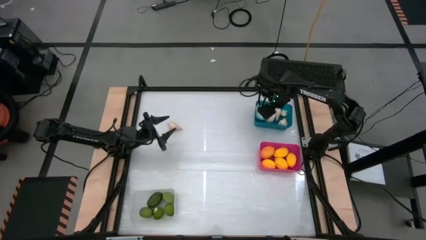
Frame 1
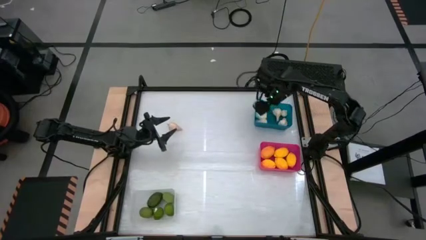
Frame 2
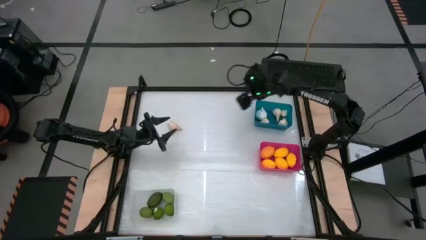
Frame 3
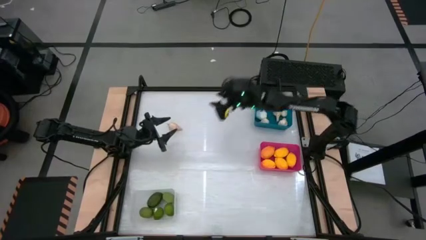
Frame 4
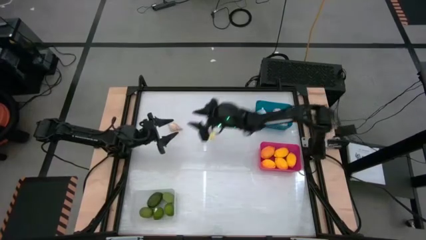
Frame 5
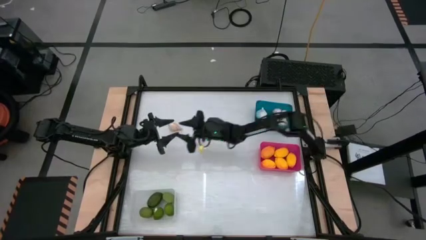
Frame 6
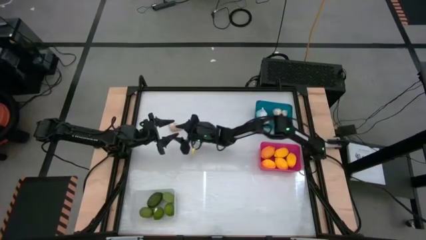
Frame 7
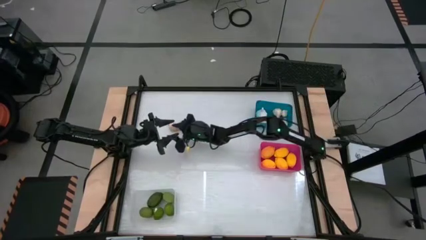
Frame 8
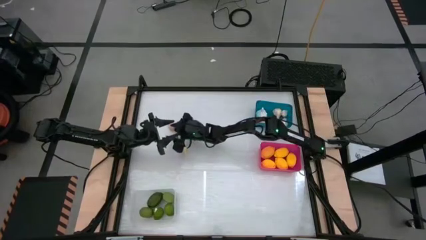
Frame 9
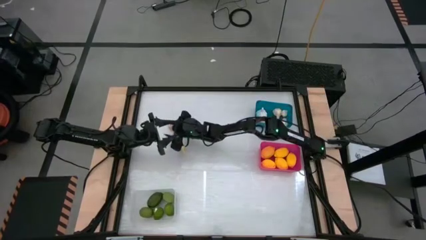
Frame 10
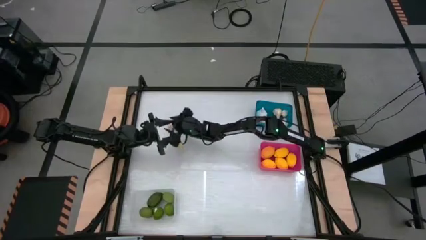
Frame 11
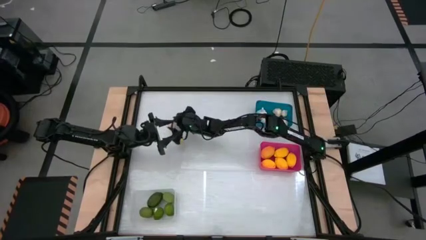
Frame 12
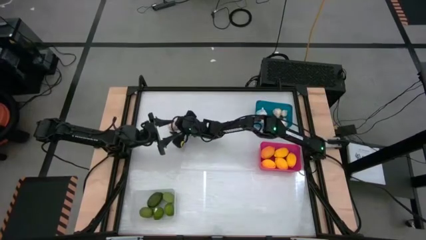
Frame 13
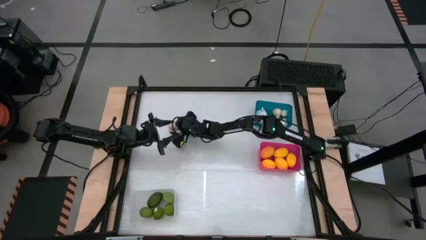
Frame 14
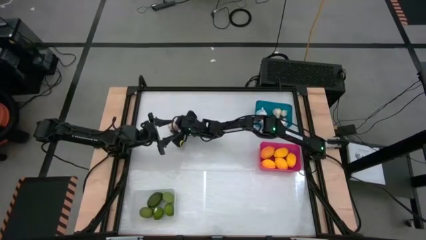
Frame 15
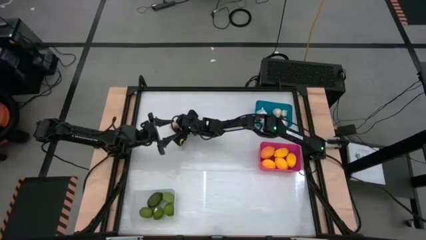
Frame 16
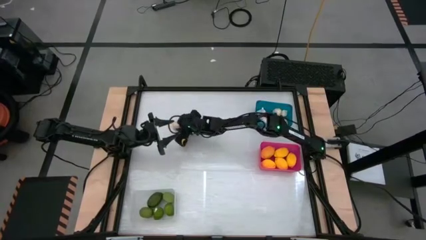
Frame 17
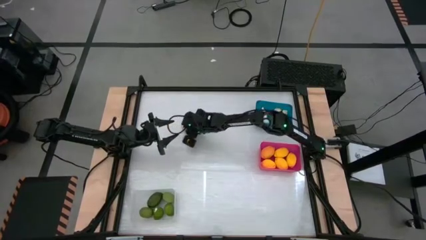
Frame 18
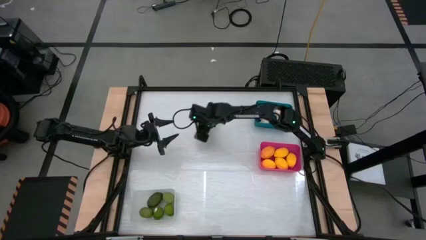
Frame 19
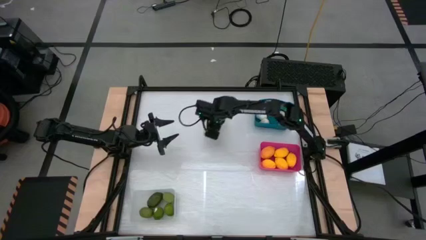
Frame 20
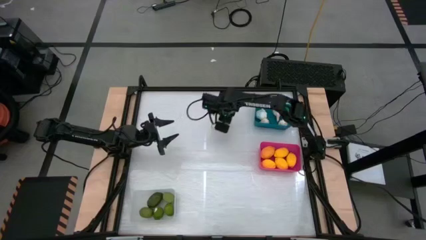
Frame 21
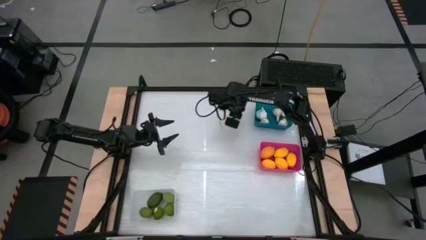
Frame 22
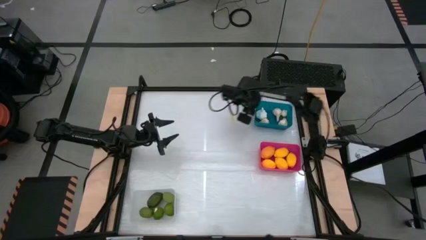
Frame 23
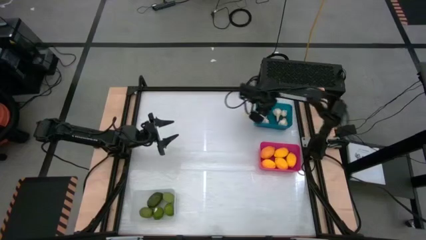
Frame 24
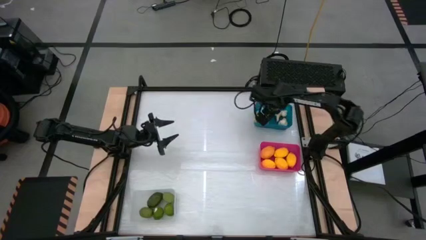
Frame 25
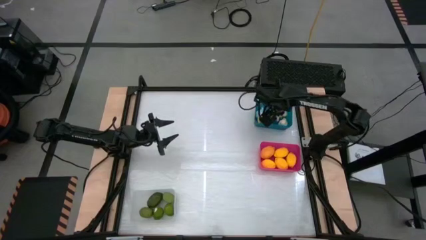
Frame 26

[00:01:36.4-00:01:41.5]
Task: Sort produce into baskets
Put the white garlic into the blue bin

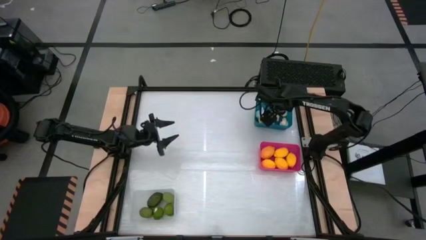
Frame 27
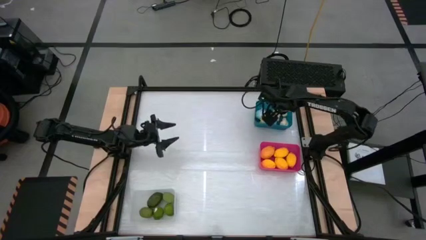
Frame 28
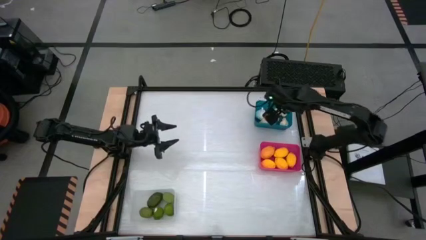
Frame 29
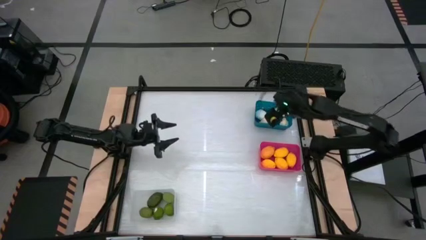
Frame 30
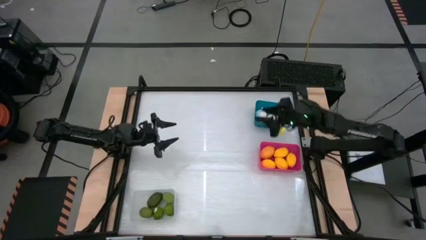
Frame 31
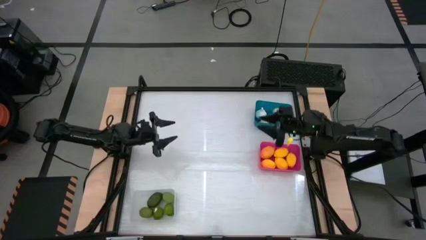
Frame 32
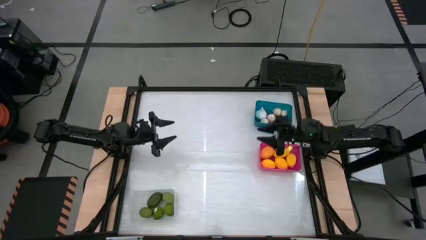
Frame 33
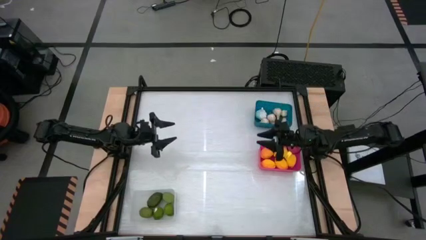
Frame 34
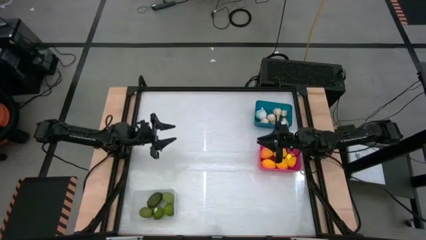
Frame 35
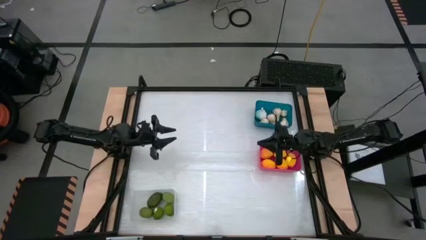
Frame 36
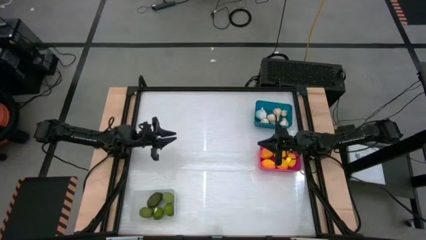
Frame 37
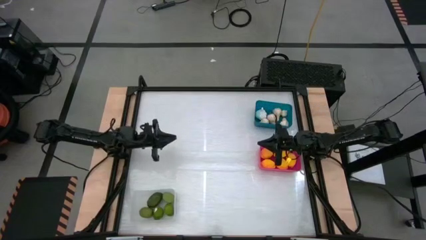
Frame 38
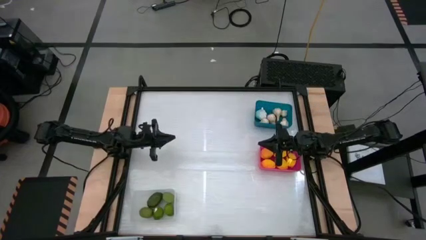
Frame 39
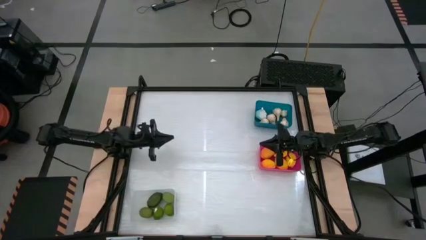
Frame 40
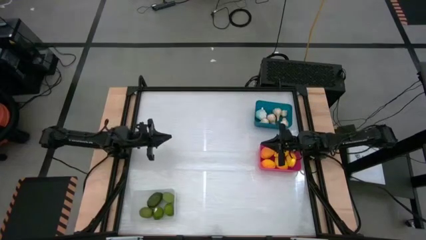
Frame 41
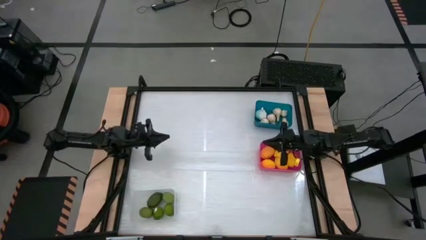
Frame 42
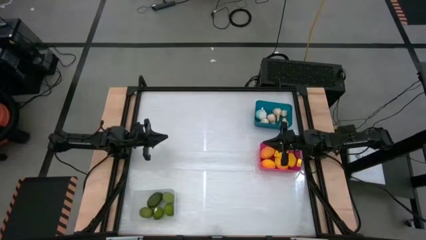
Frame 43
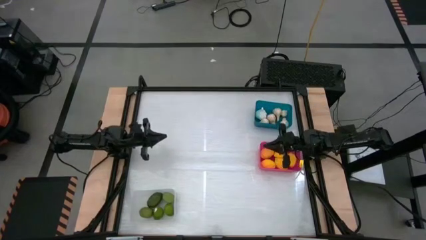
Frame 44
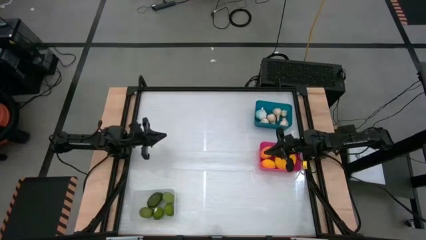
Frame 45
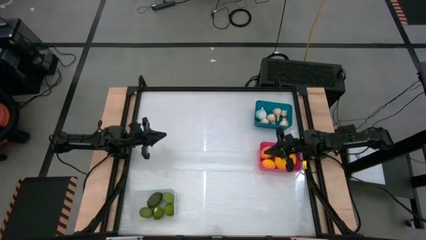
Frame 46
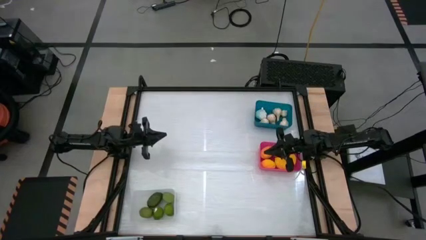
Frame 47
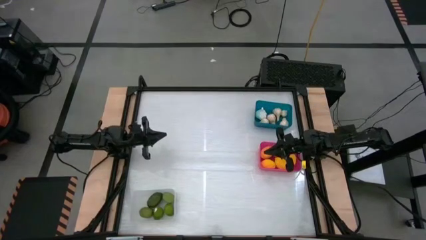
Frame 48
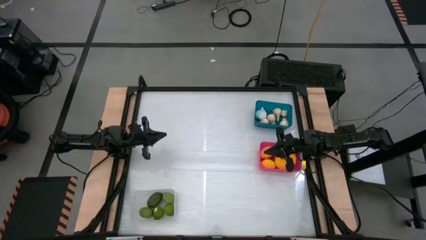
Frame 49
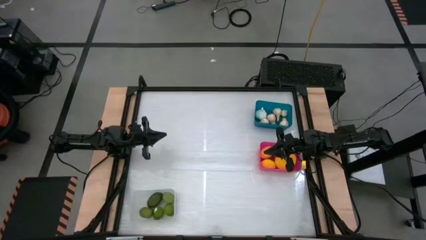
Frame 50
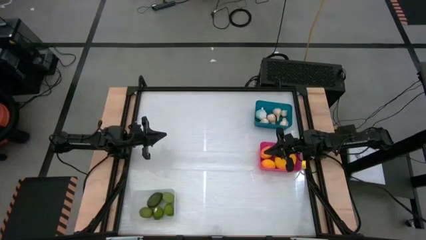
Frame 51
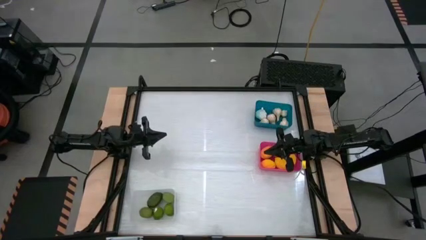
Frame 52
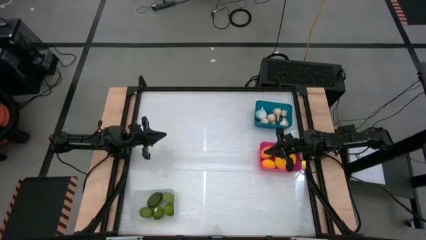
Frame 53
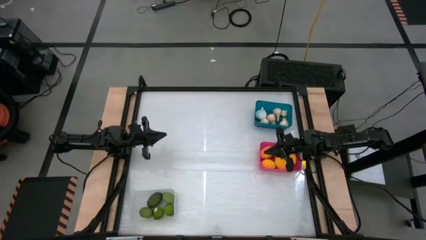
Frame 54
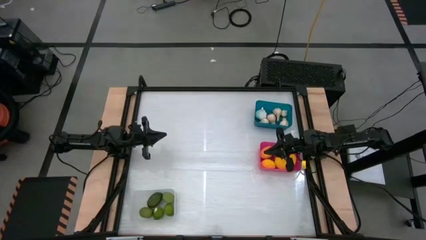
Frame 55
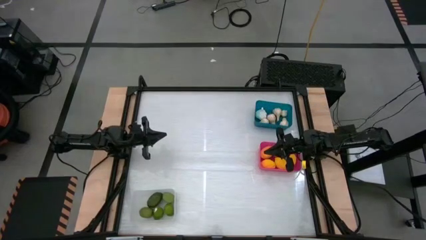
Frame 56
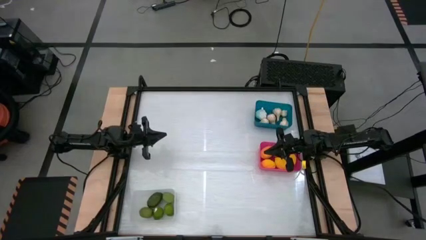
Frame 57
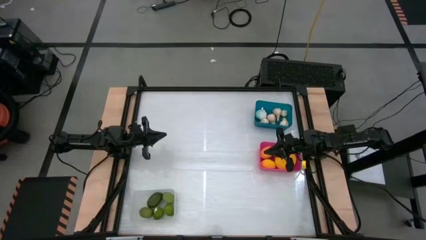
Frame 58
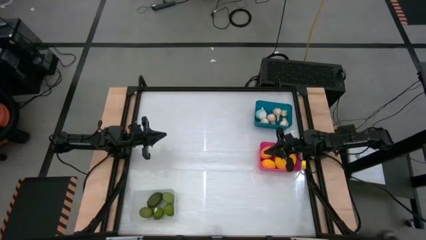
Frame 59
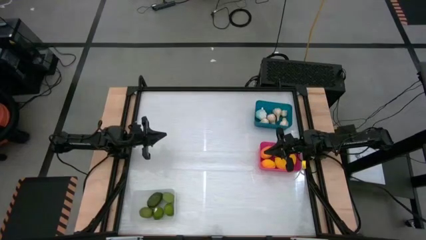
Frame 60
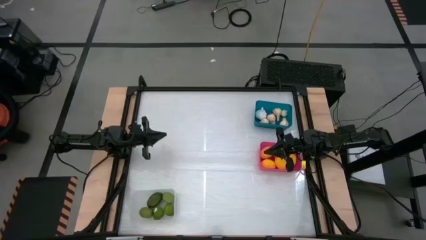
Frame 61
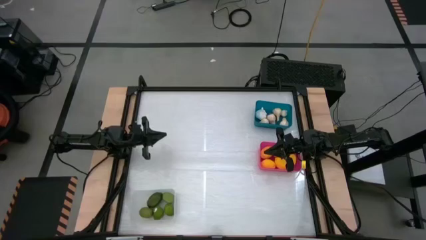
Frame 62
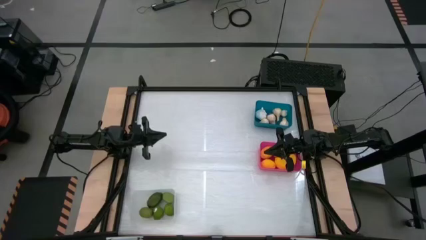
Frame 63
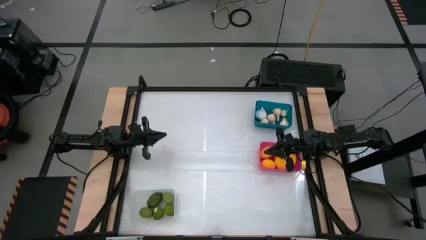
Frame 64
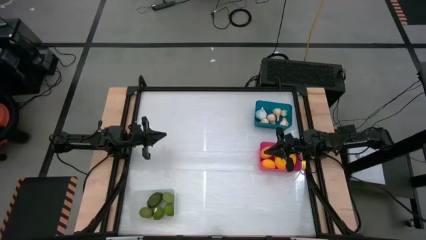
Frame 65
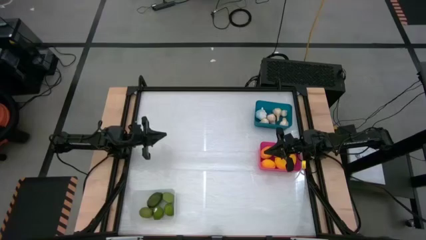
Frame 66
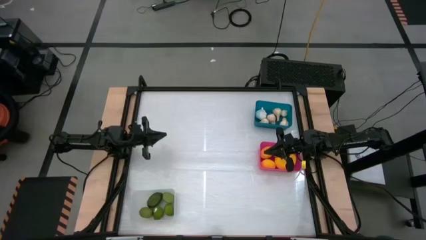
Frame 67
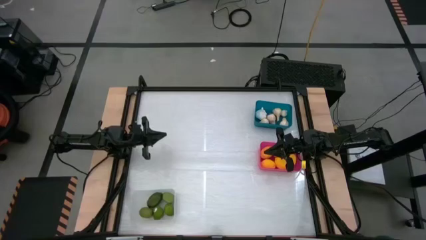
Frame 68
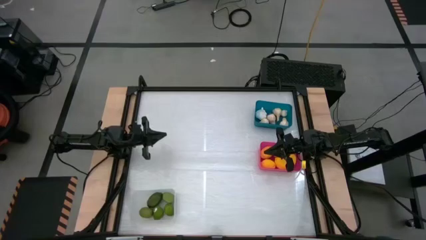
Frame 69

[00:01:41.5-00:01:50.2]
Return to Home Position

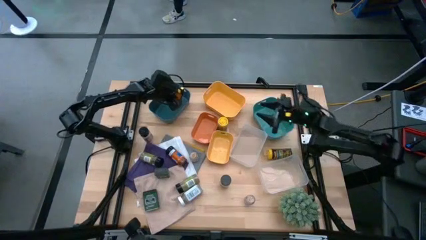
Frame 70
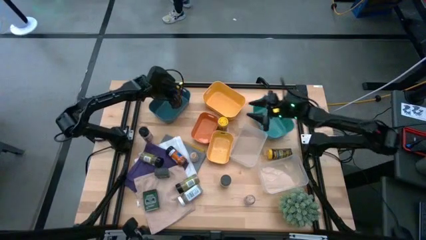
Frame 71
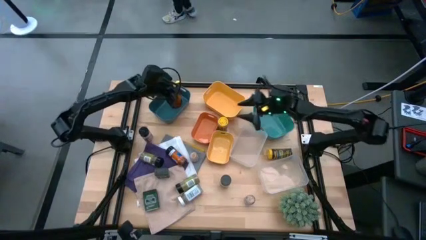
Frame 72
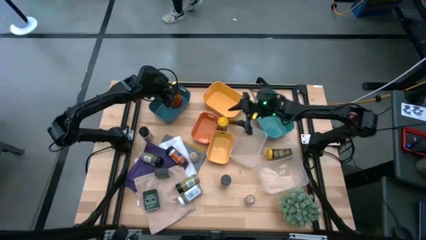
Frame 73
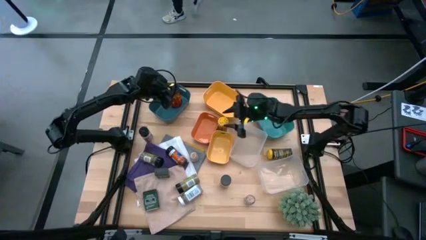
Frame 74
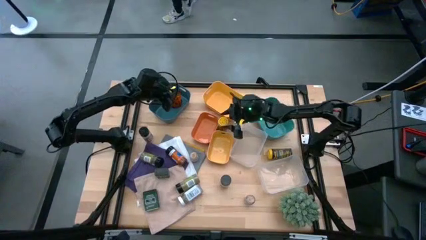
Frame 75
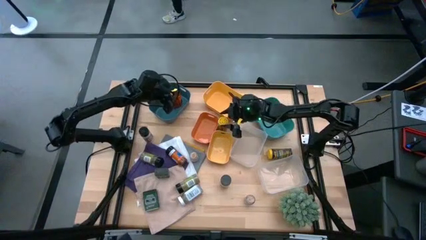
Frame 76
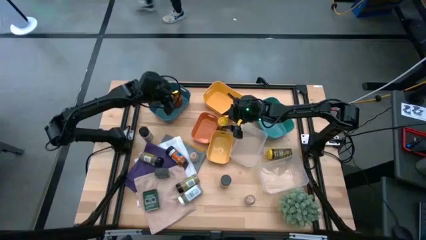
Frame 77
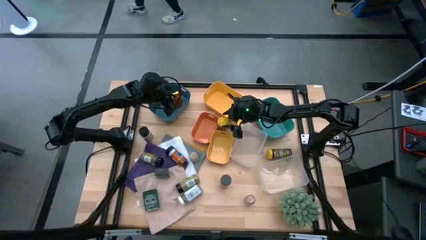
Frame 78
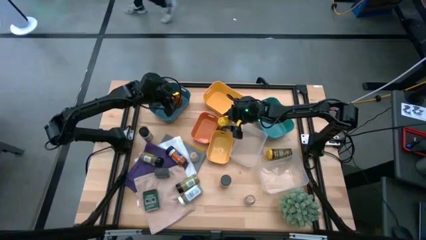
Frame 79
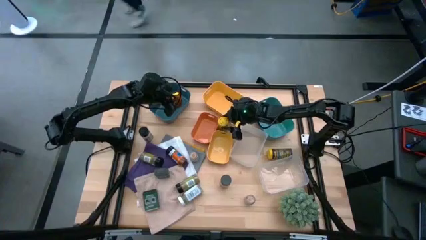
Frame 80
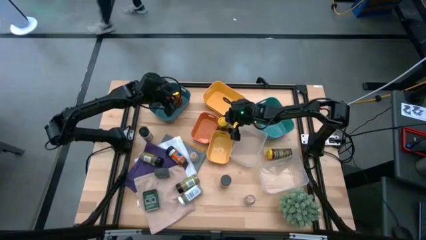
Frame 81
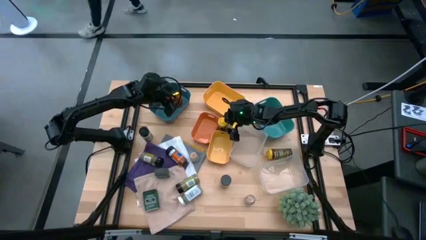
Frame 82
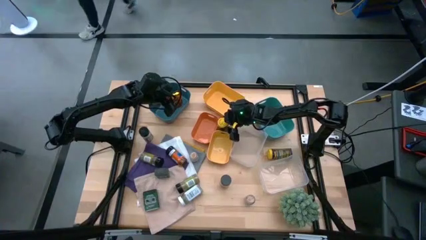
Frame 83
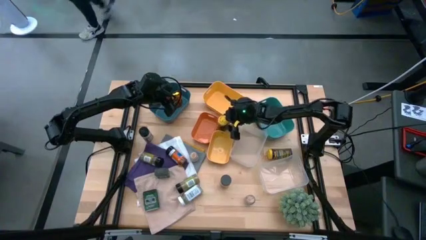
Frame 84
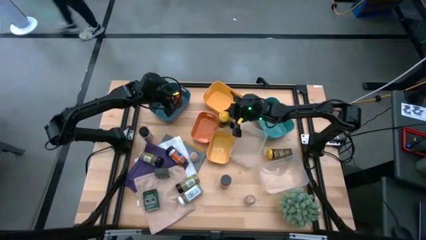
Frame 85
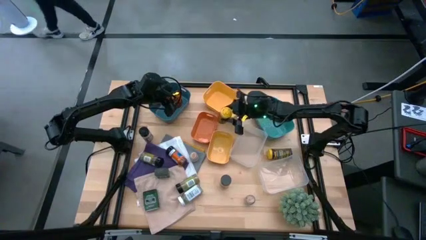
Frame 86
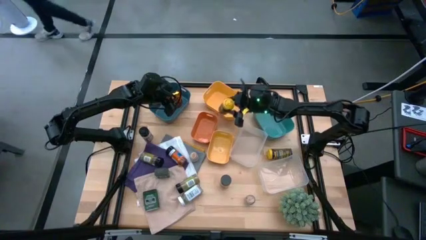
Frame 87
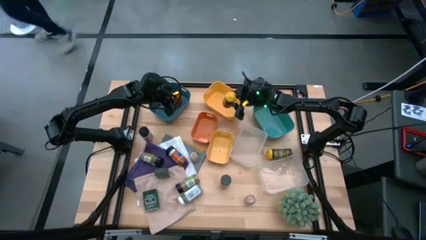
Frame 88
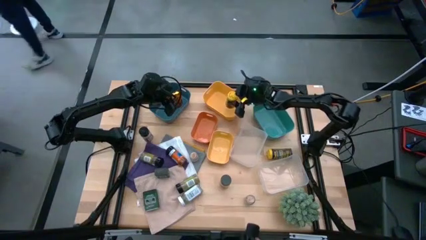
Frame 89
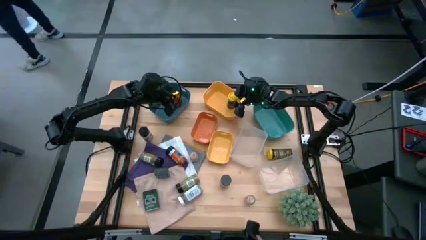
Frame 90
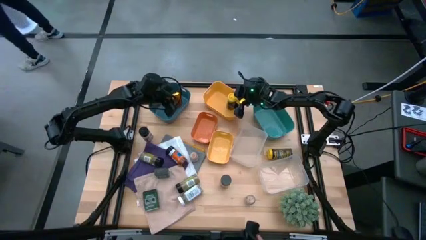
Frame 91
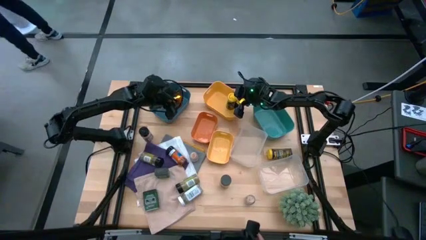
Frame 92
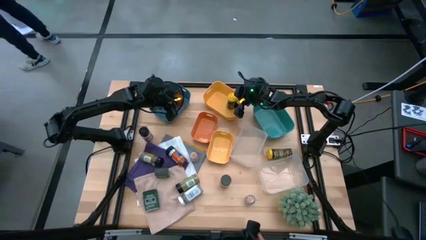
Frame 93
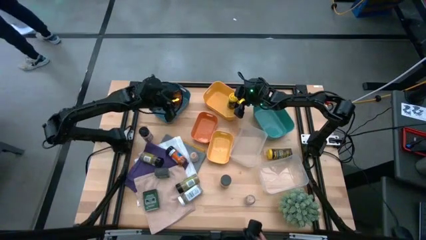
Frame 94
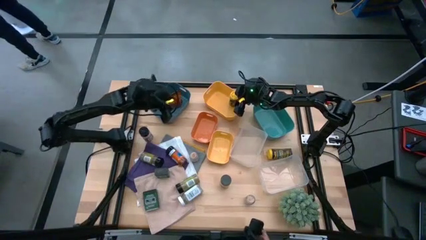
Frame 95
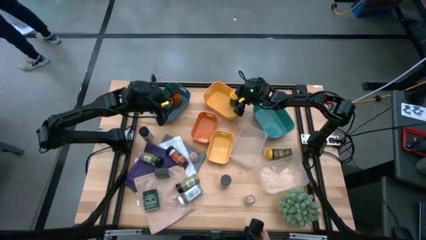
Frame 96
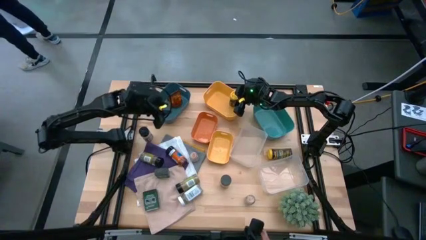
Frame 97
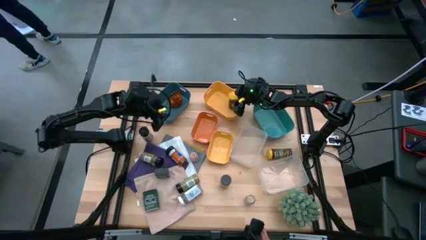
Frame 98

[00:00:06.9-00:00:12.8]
Task: Sort spices by type
Put the yellow seasoning bottle into the big yellow bin
